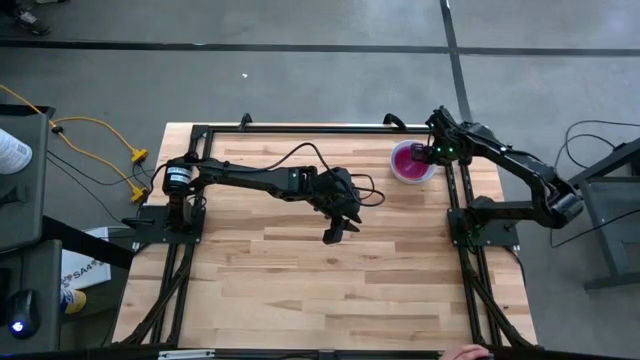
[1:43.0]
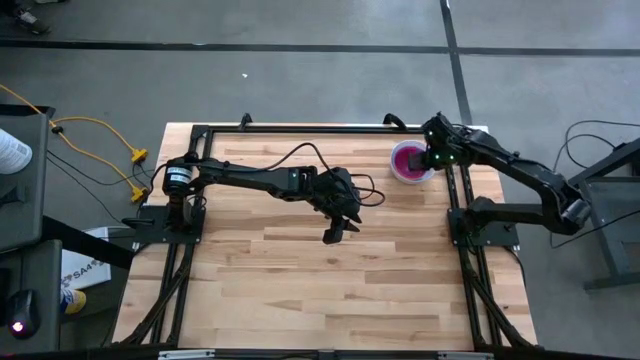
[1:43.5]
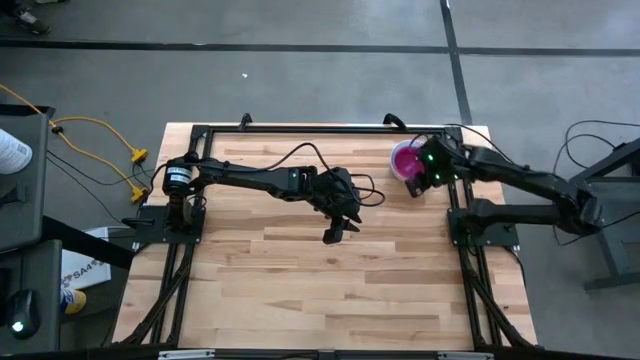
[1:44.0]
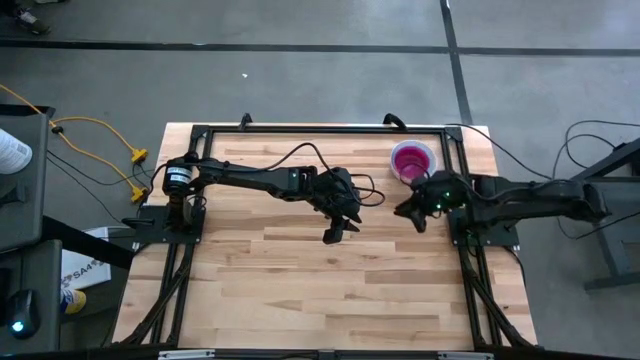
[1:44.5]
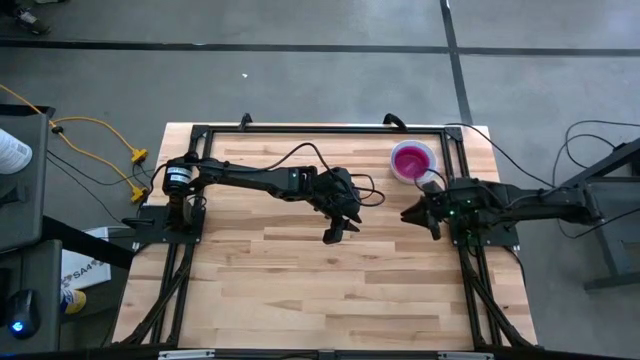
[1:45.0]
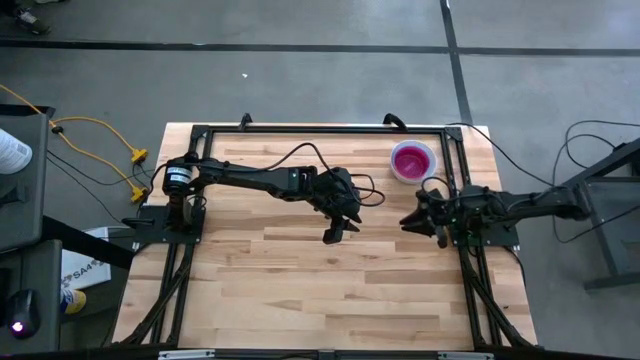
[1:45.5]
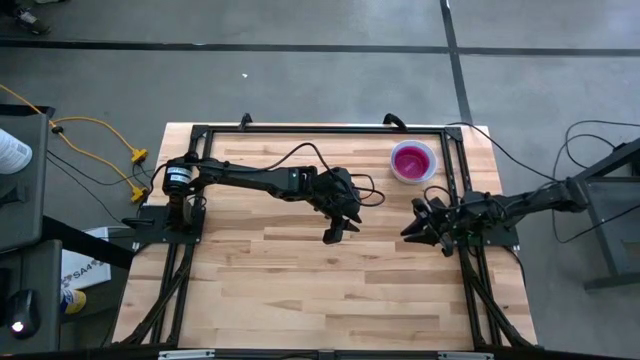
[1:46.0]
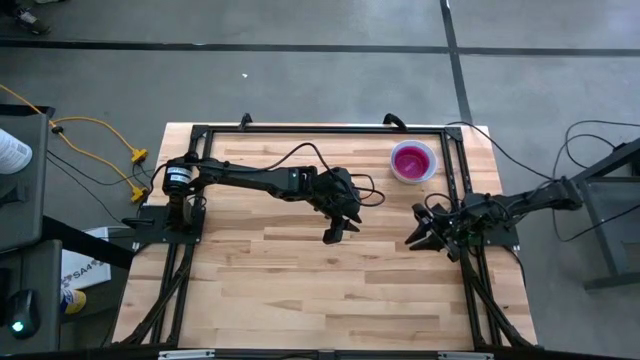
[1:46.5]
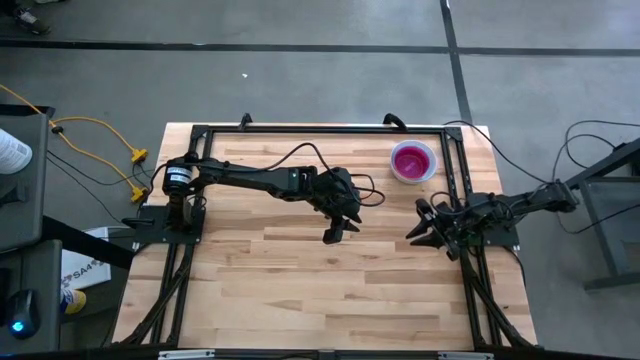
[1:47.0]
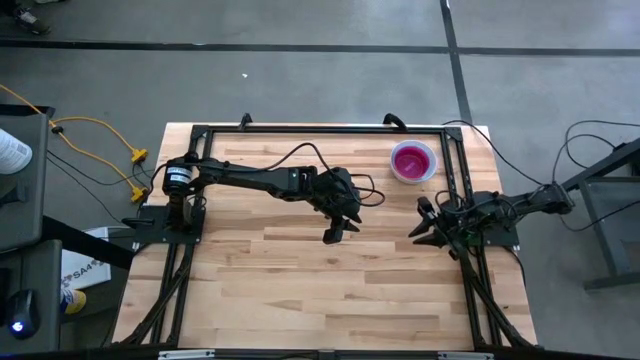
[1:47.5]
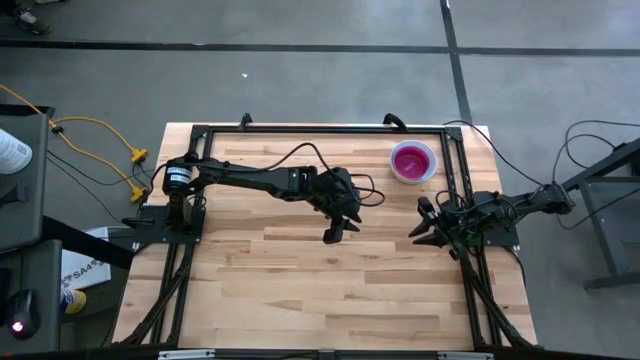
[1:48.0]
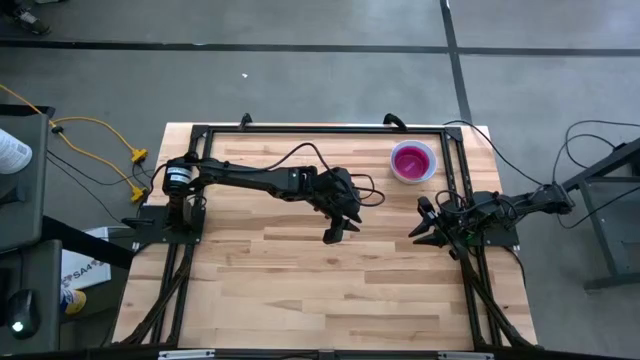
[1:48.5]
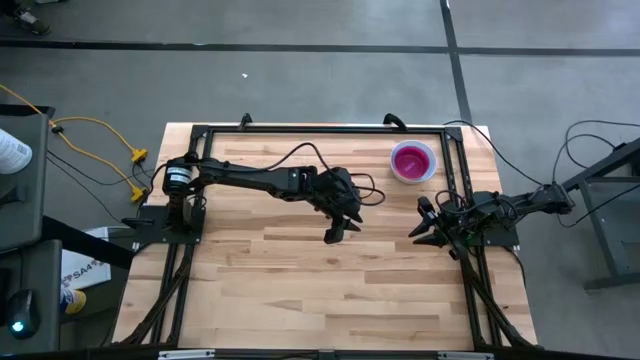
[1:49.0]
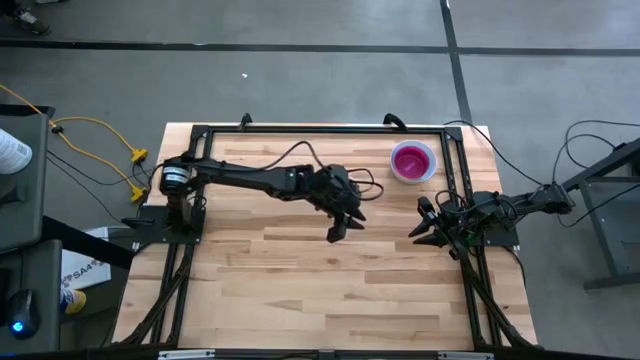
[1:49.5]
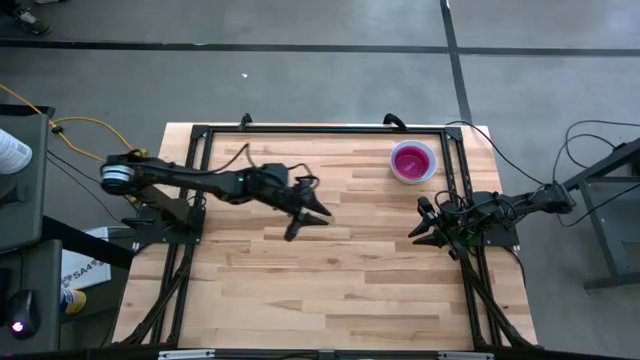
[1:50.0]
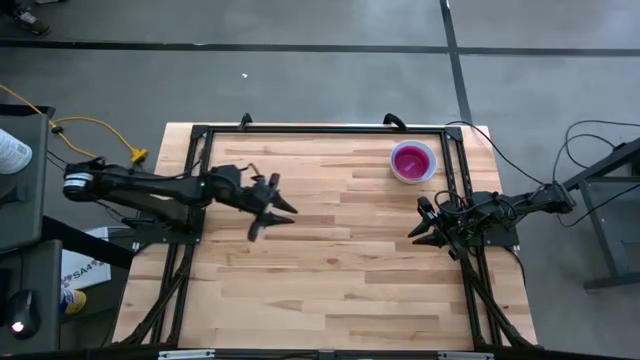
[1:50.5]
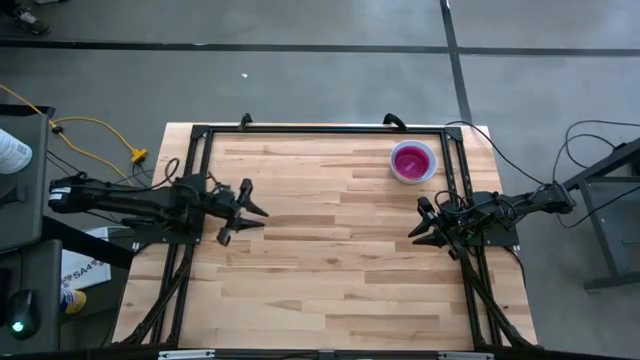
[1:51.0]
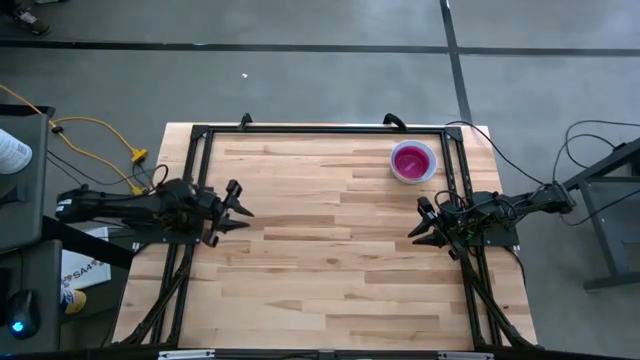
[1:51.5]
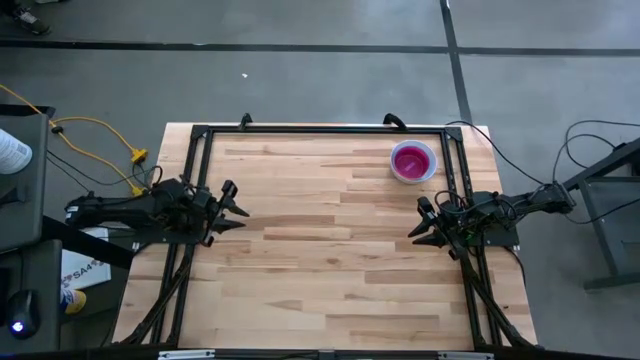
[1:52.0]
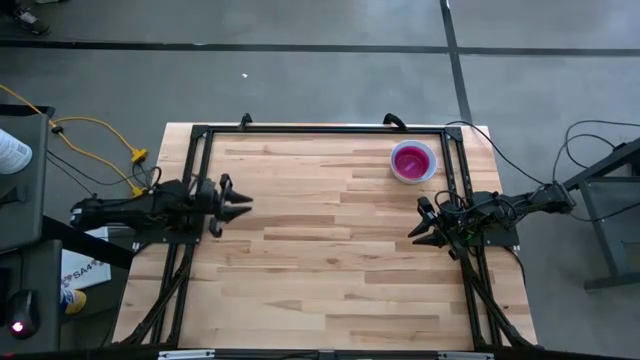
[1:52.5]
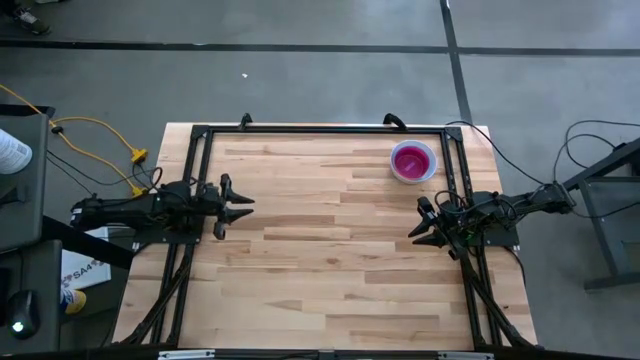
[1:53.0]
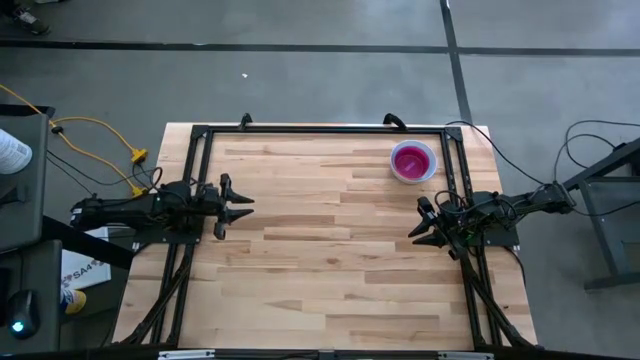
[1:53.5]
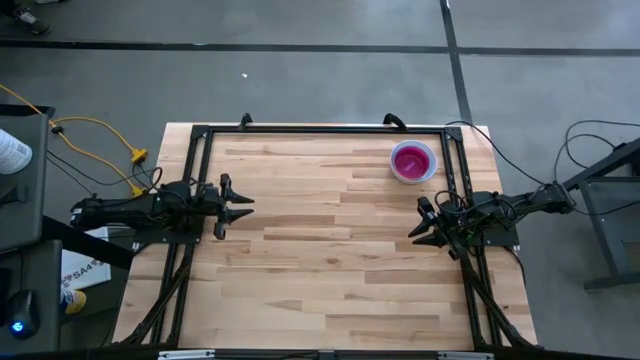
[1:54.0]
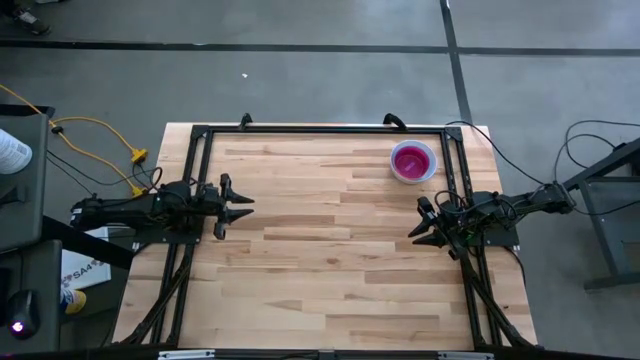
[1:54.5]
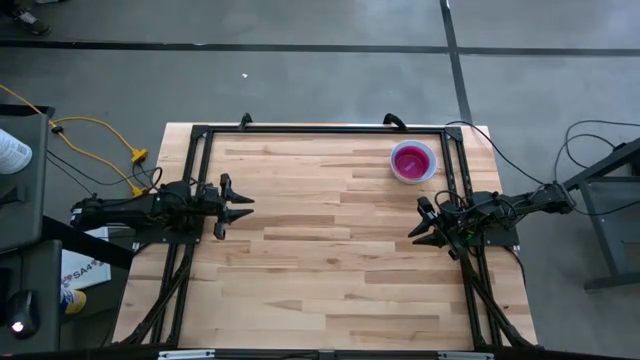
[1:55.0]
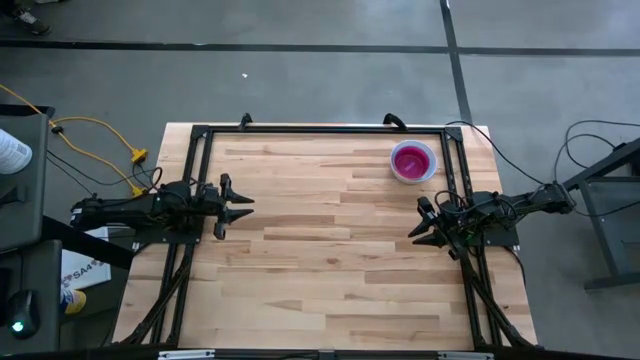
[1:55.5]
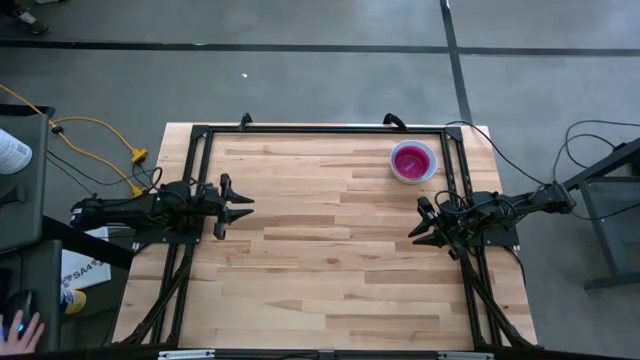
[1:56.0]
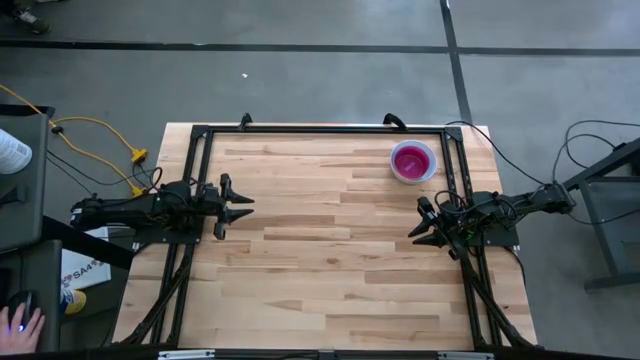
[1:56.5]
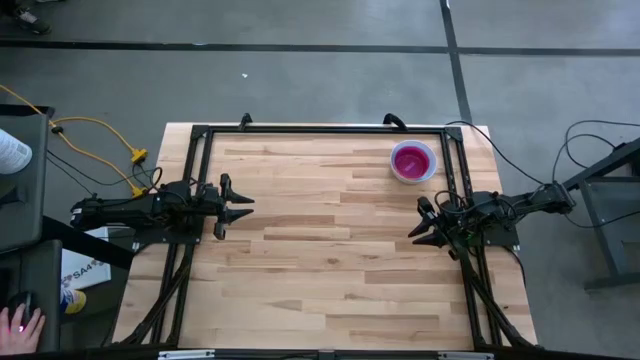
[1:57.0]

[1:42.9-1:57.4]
Return to Home Position

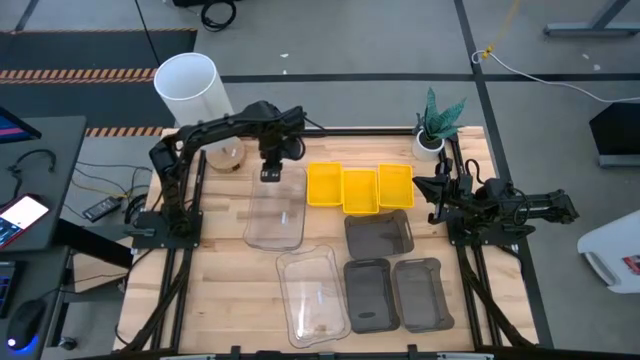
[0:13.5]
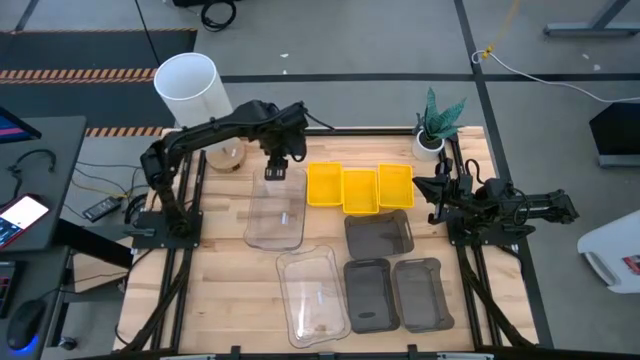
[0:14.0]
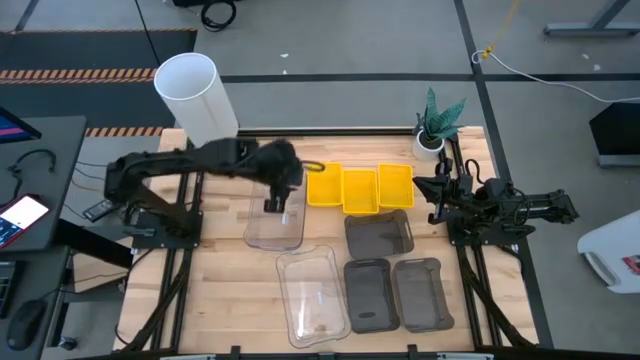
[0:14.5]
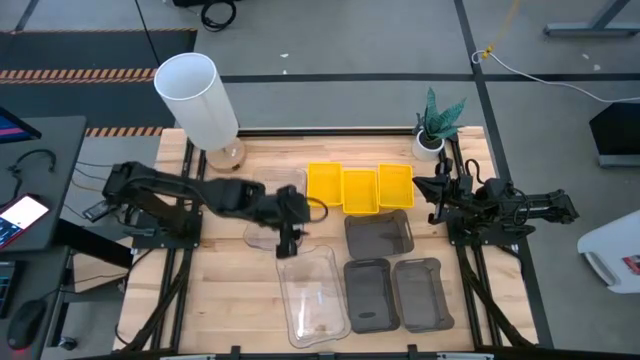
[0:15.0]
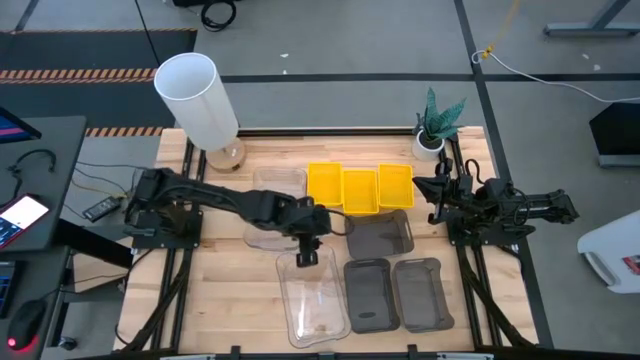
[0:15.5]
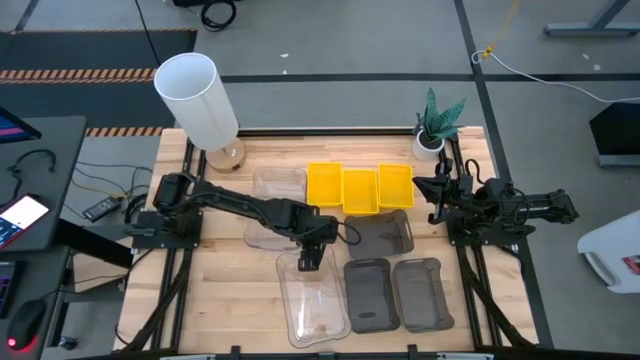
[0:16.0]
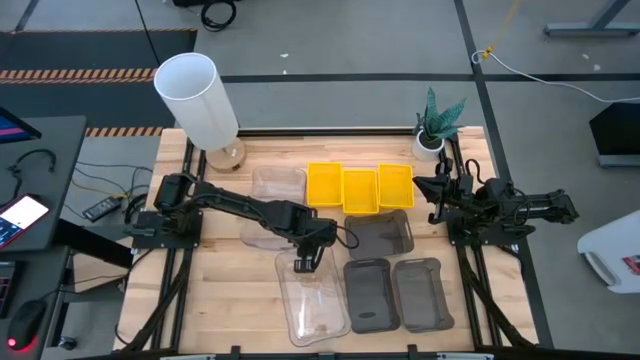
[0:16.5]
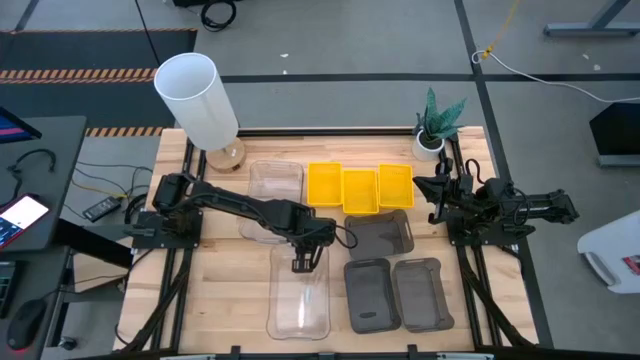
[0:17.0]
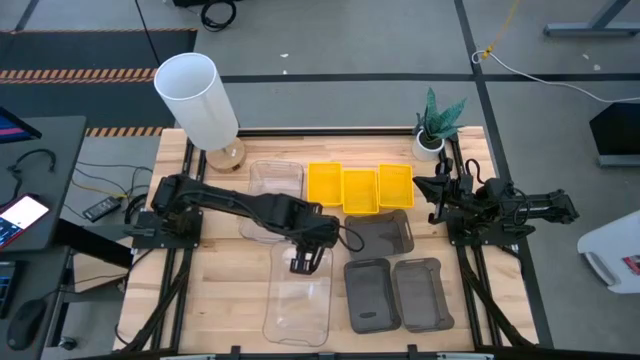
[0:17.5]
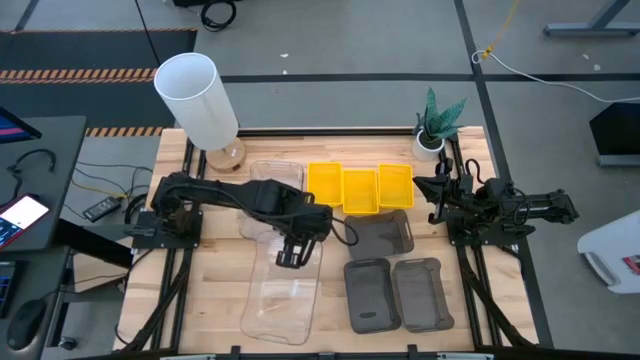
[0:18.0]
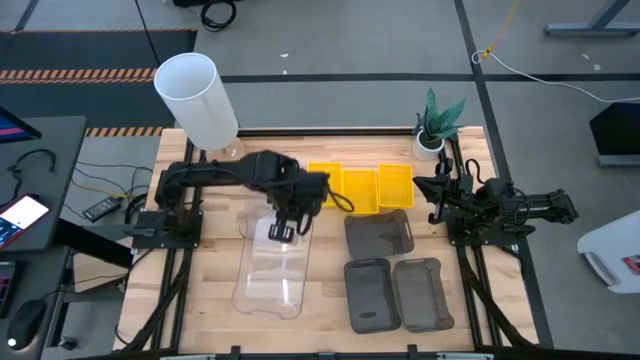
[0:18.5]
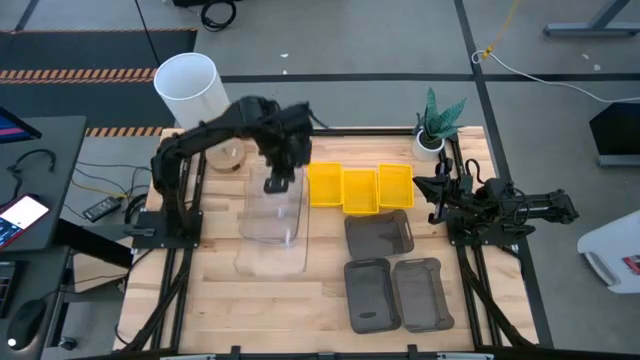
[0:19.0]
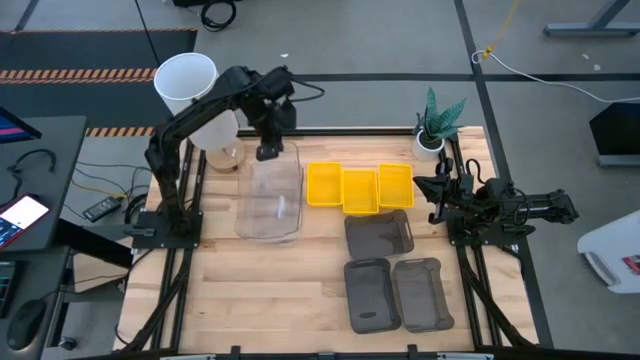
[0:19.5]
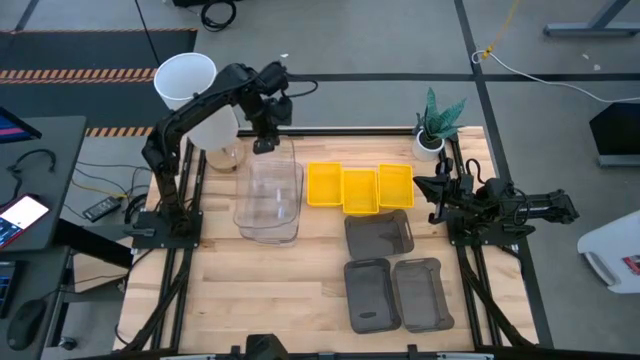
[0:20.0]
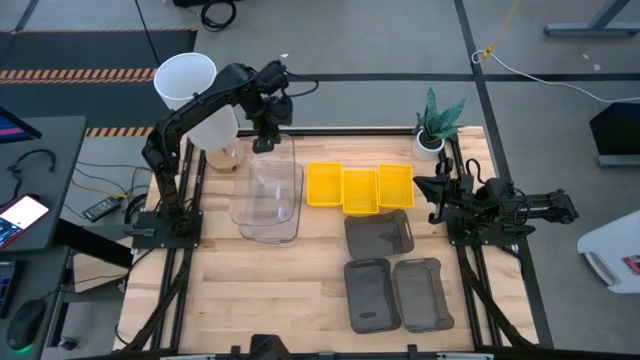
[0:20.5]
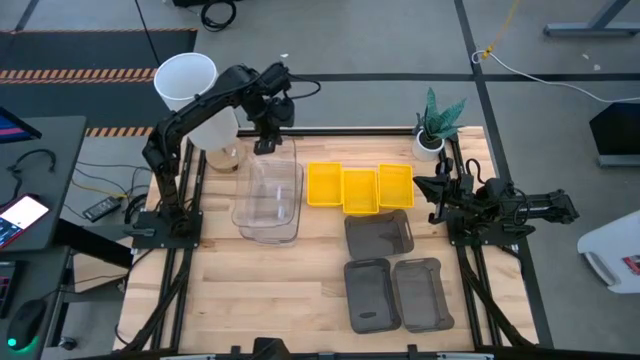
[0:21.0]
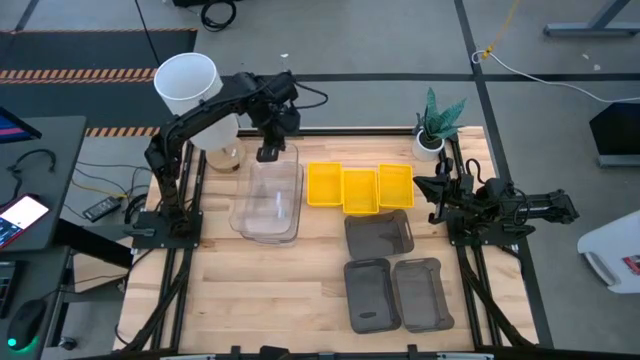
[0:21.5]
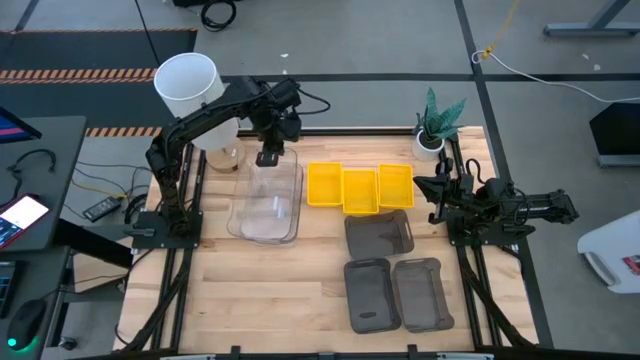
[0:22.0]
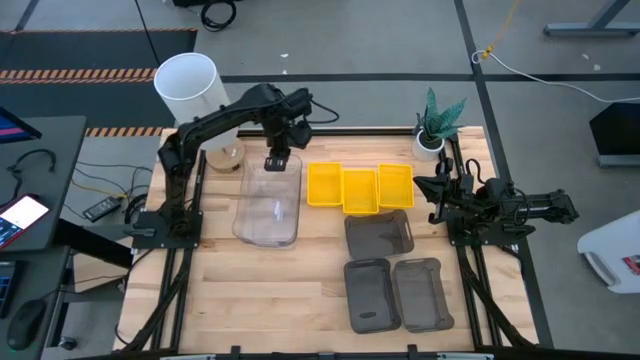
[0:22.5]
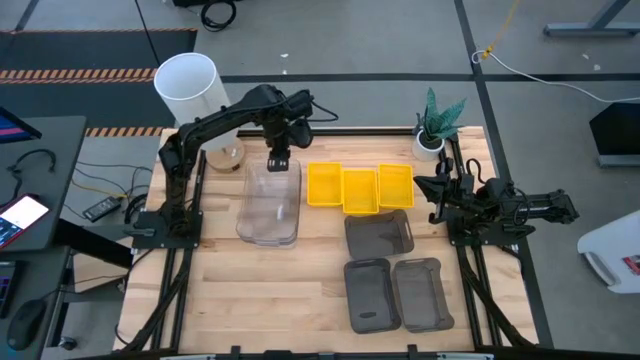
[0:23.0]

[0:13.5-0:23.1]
Stack the bottom transparent bin on the top transparent bin
